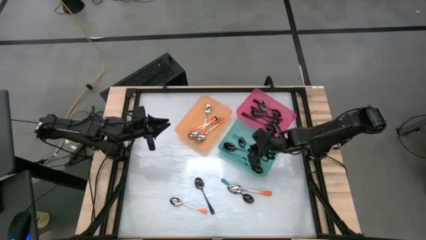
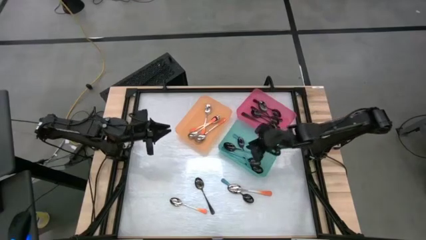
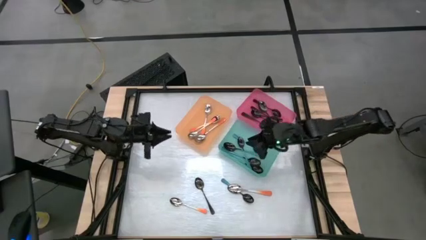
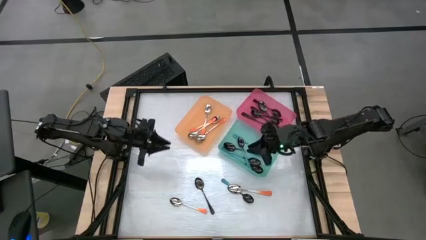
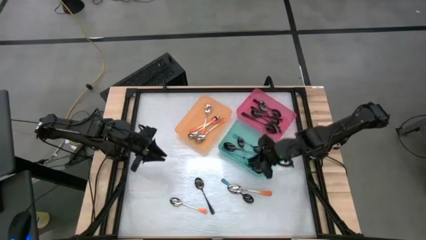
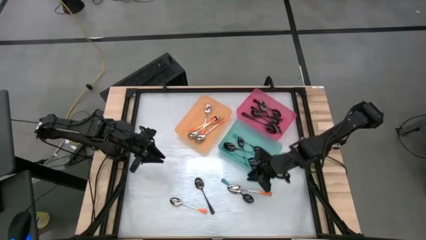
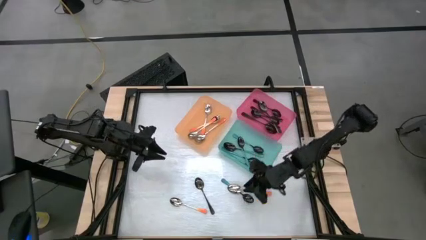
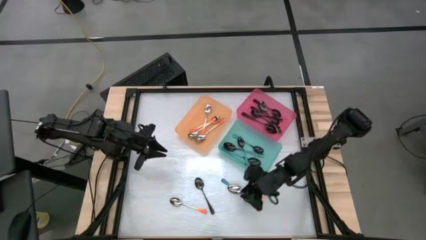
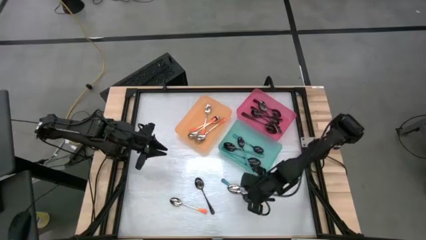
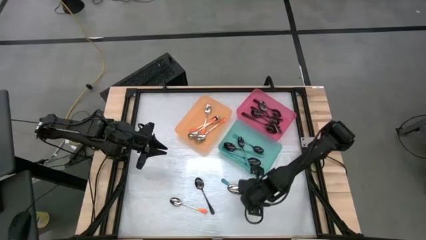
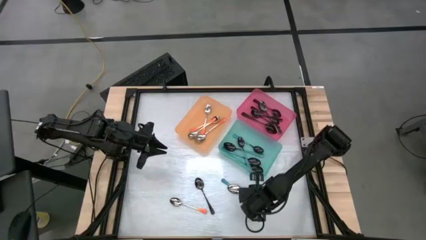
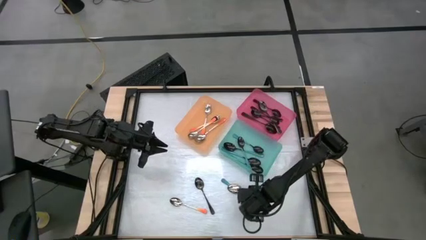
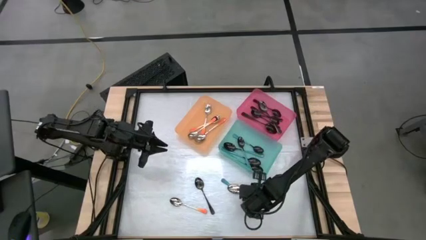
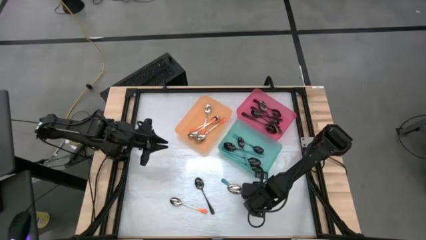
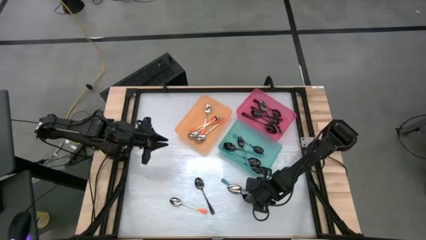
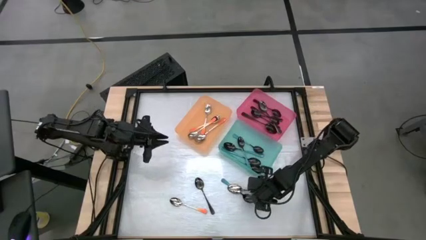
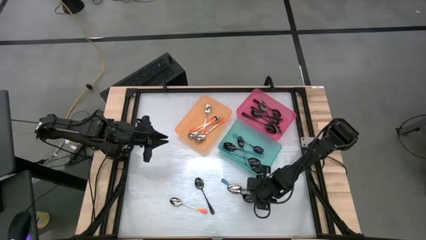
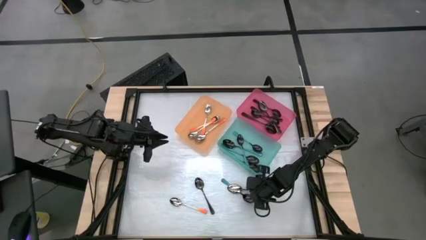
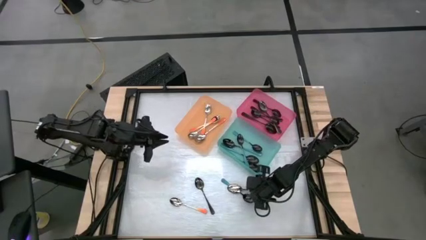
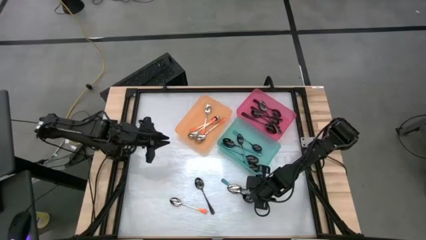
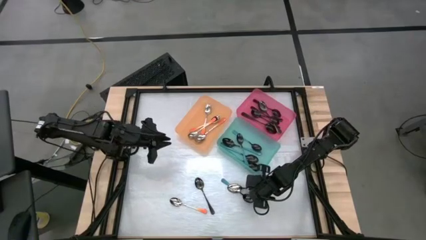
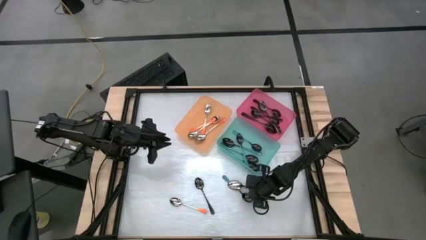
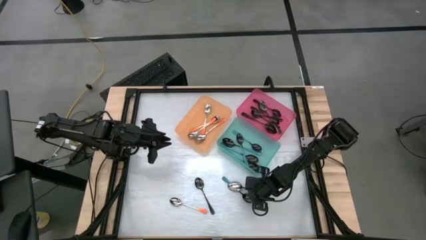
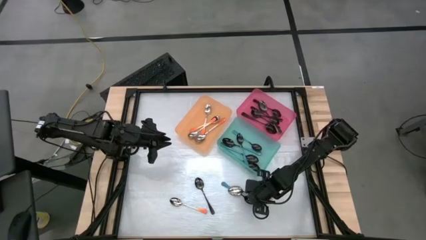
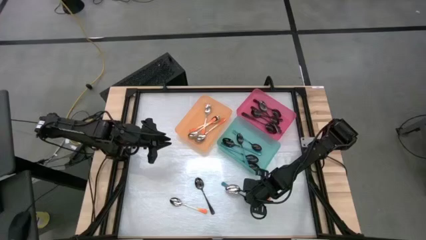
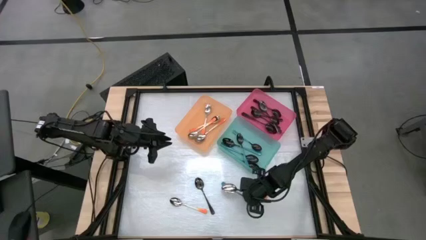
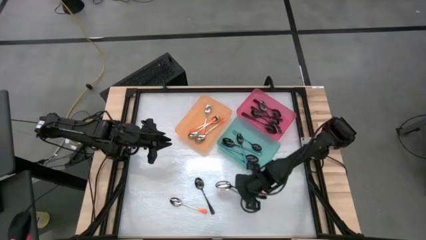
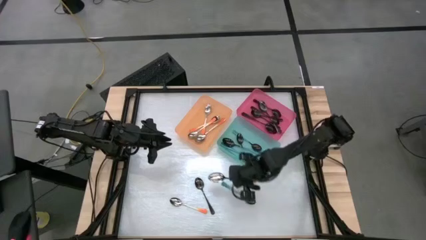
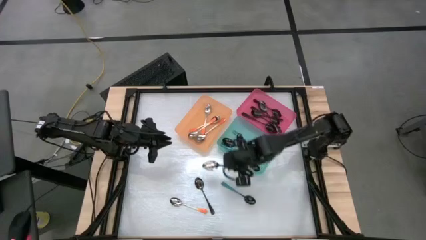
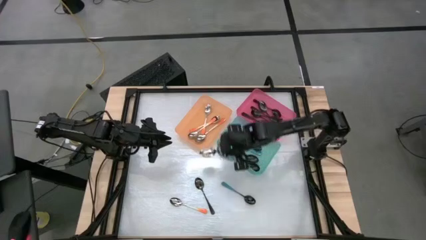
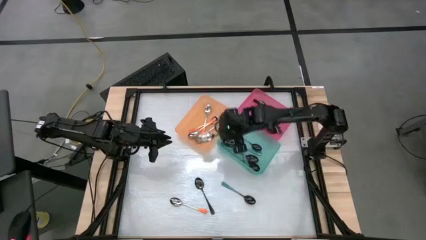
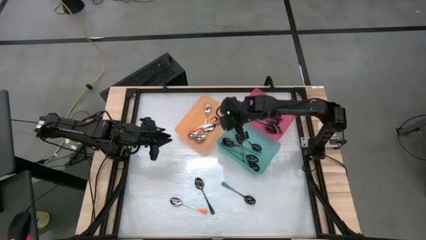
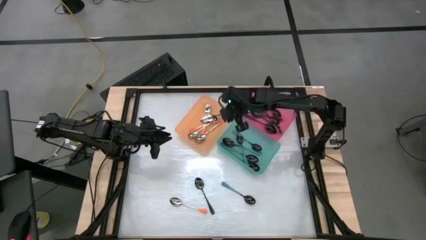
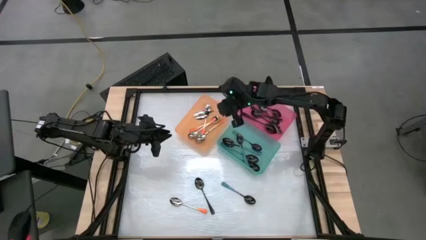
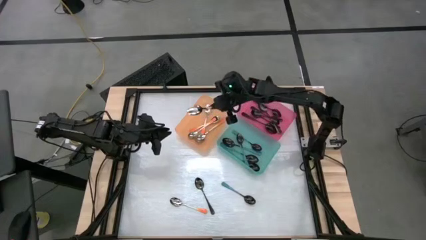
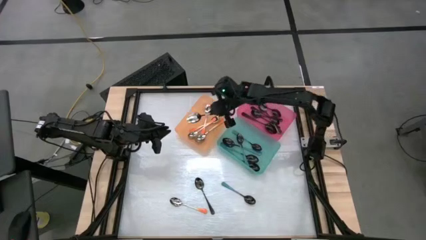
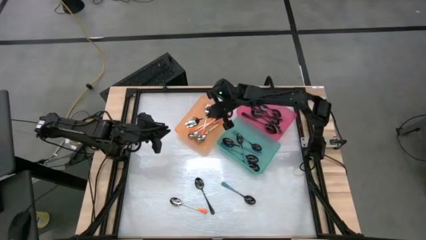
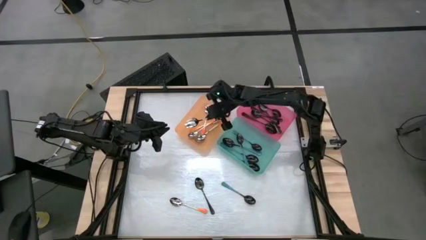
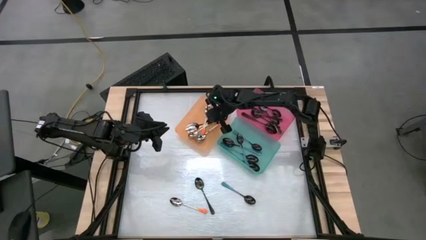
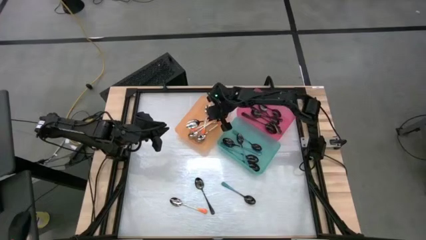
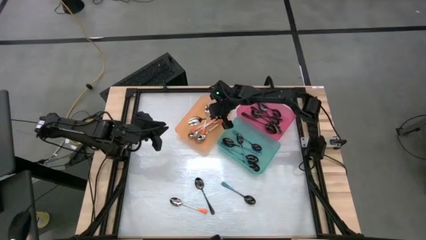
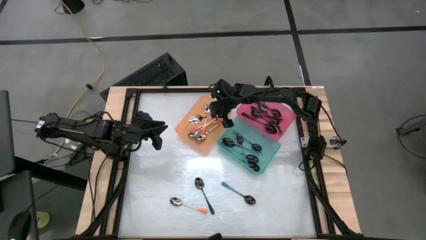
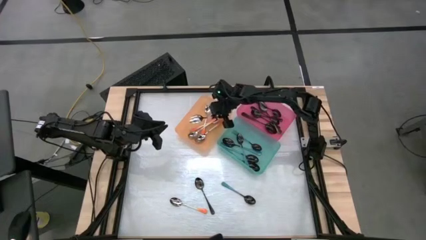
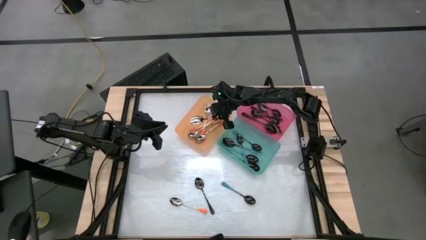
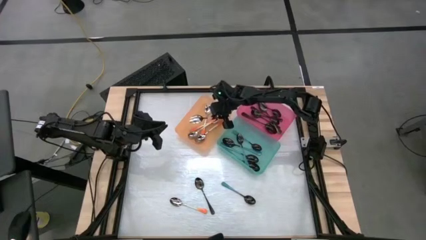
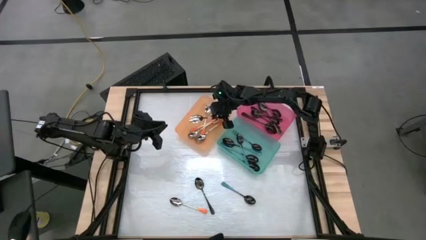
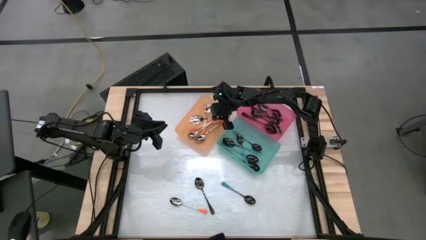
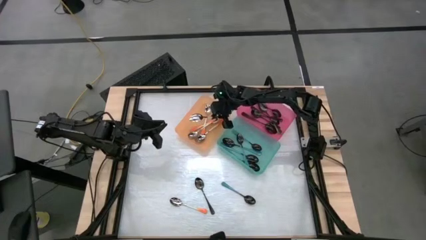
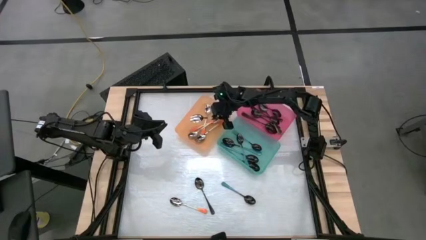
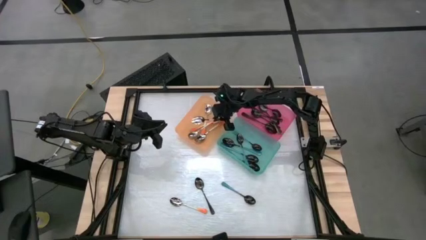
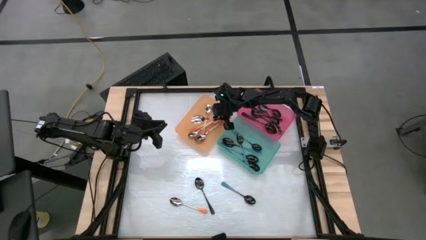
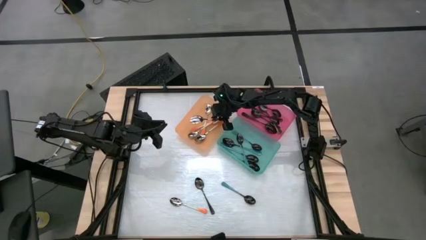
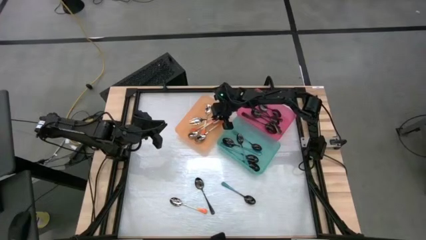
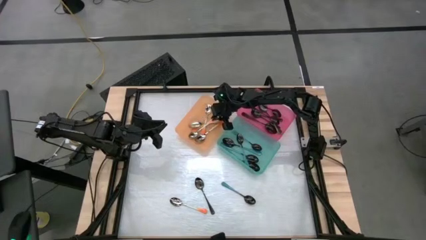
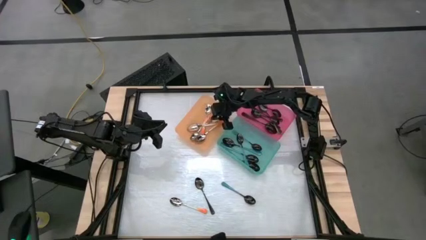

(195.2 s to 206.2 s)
Task: Sort silverware by color (type)
Put the orange spoon into the orange bin
